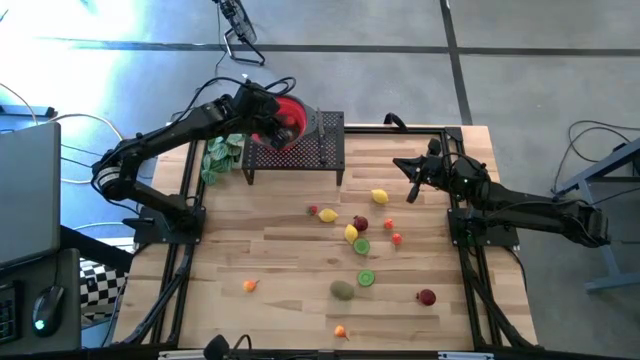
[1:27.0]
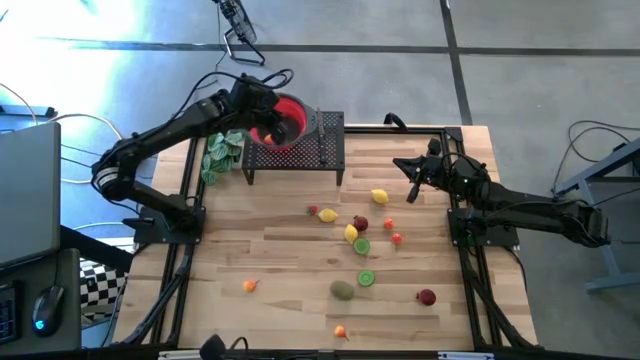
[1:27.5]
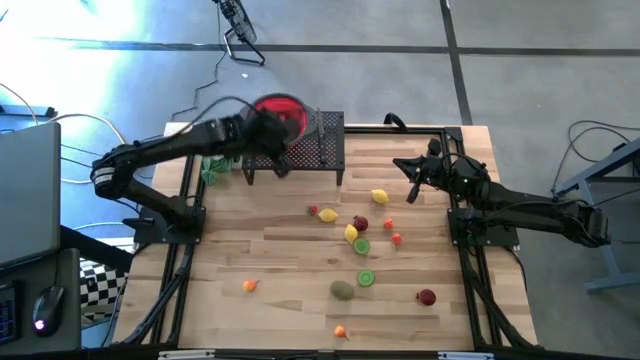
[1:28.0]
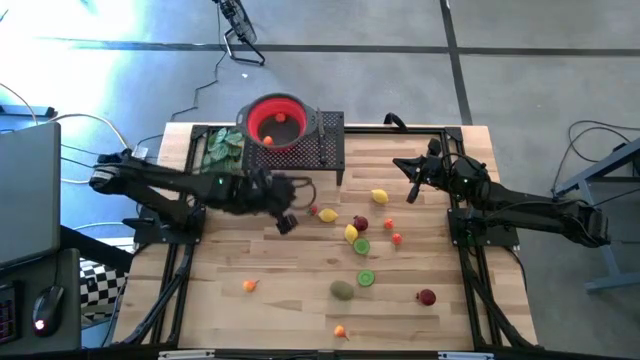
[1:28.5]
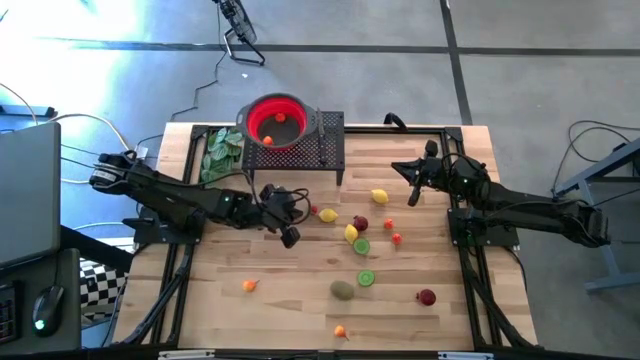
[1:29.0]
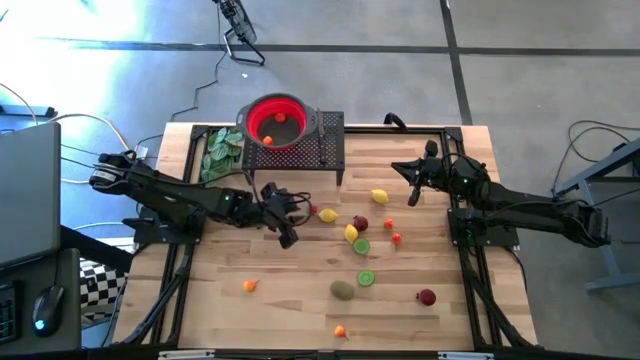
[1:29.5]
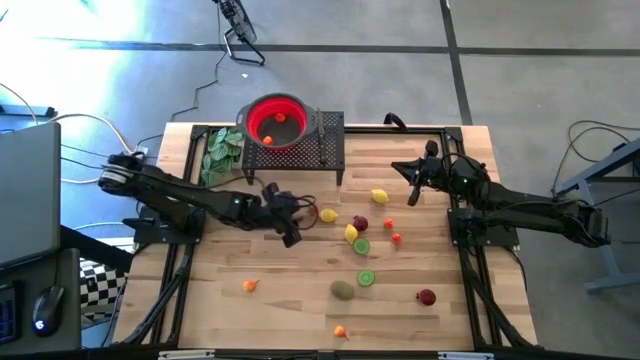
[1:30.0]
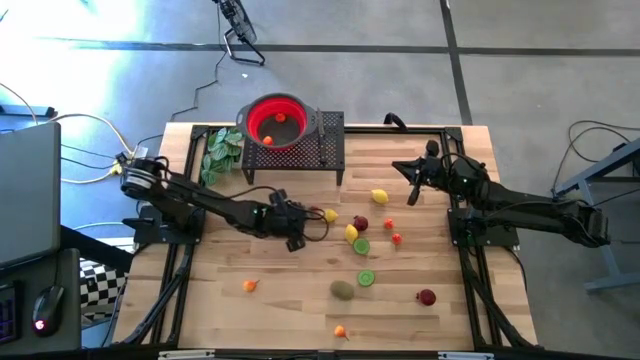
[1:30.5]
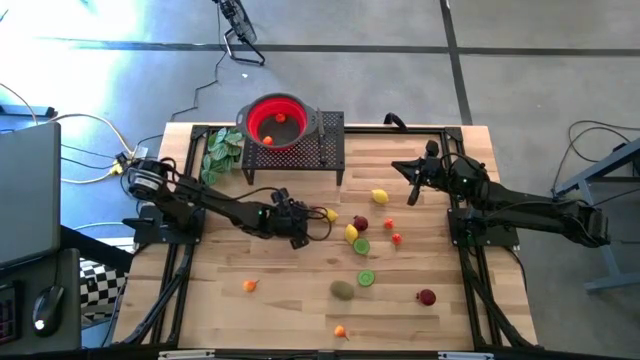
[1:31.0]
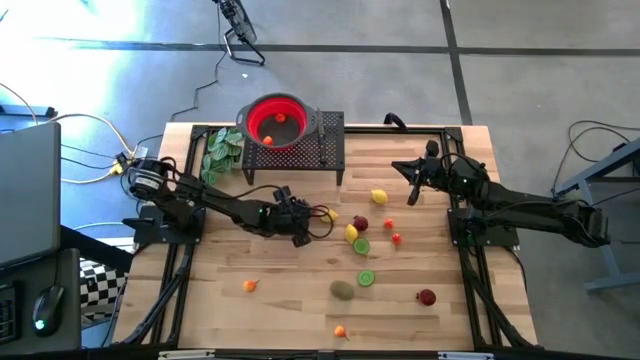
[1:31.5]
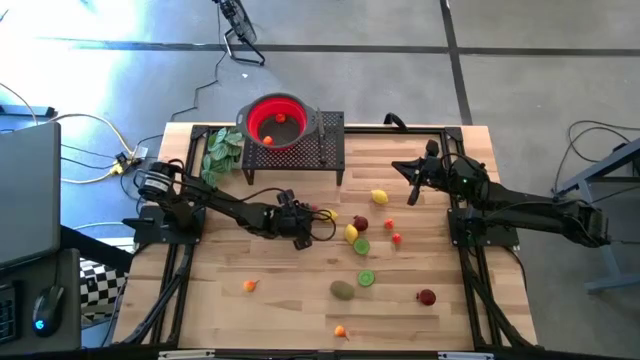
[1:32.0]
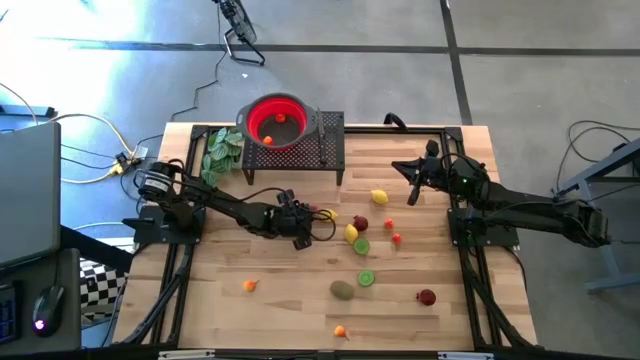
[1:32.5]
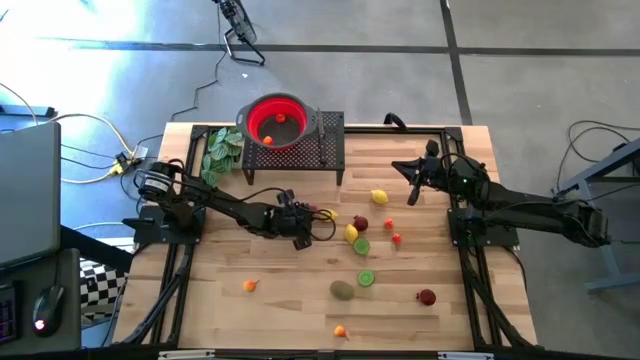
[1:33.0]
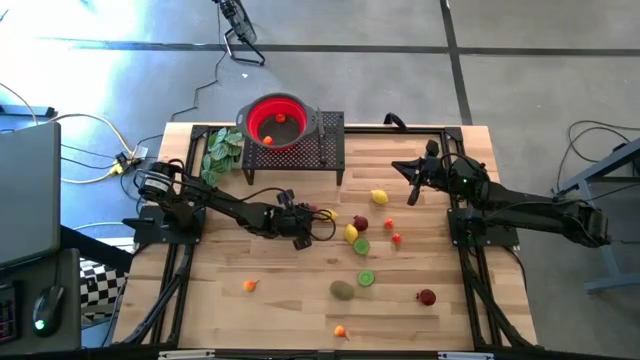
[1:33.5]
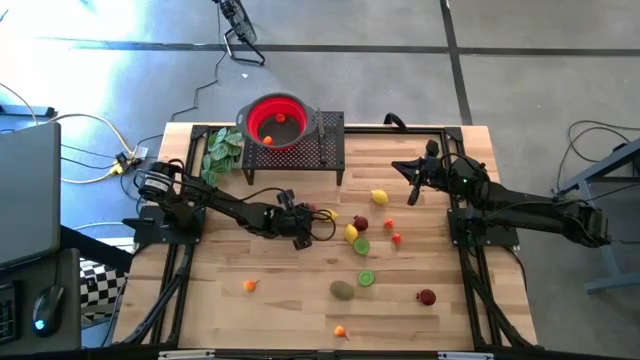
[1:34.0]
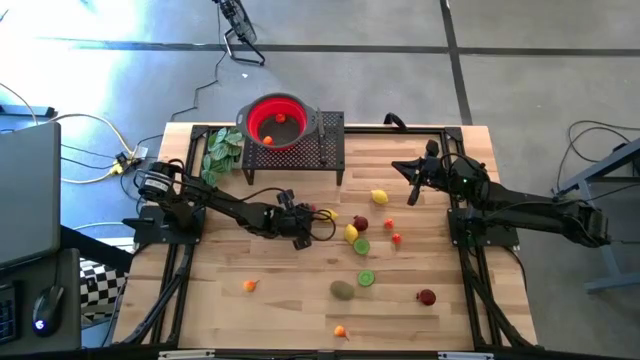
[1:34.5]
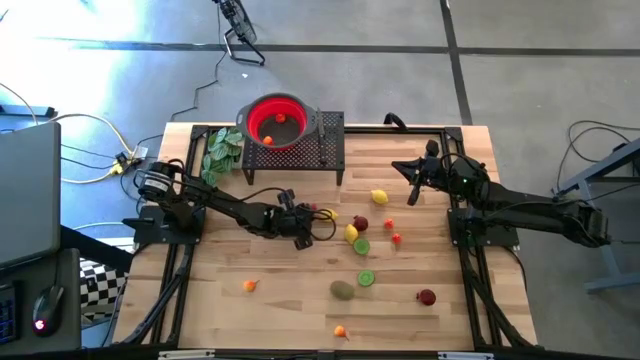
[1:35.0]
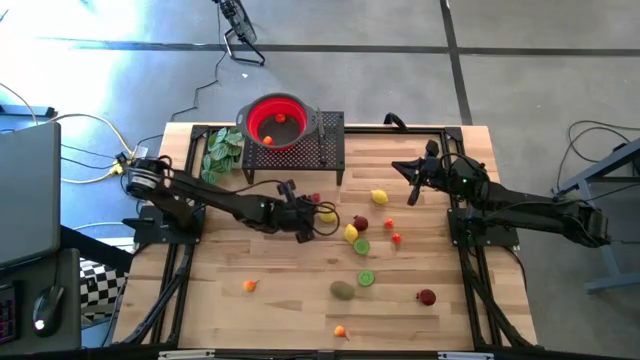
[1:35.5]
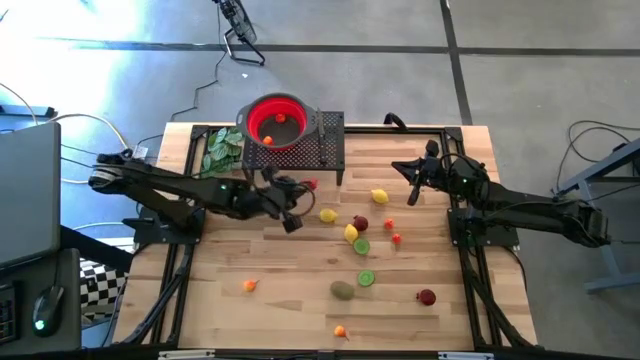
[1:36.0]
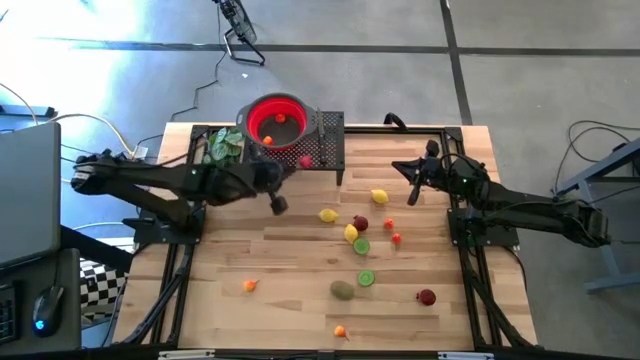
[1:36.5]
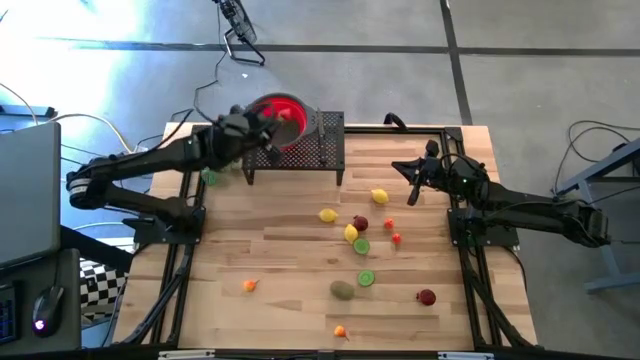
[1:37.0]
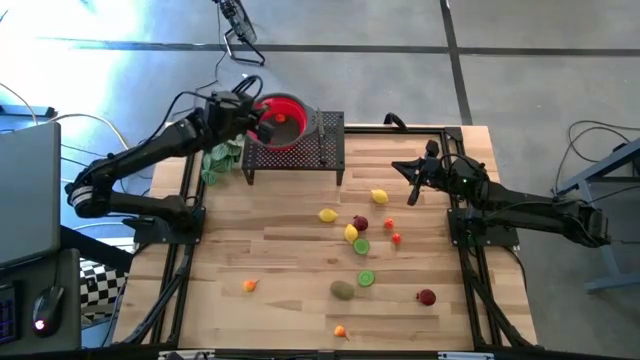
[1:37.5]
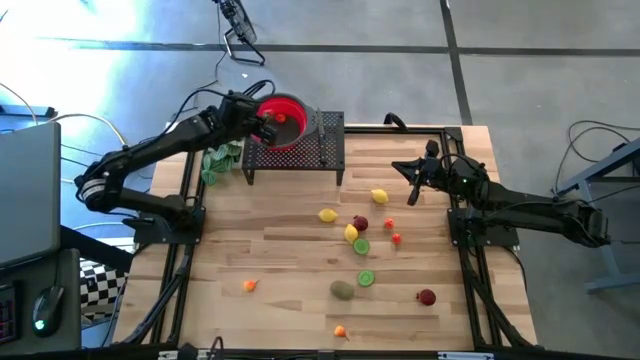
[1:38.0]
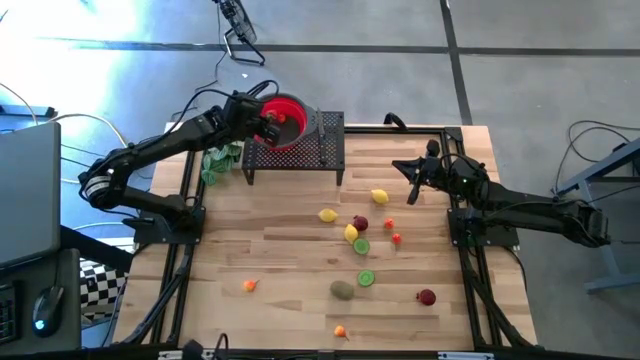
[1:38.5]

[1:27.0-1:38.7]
Task: Pick & Place Fruit
Put the red strawberry into the red strainer bowl on the shelf
